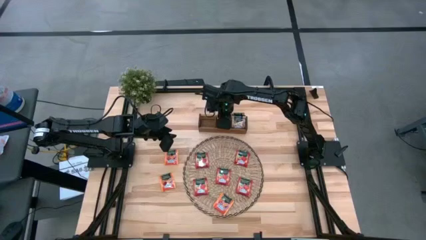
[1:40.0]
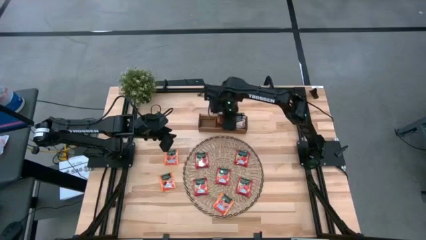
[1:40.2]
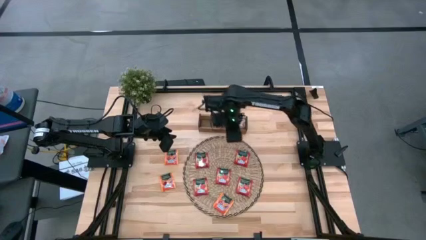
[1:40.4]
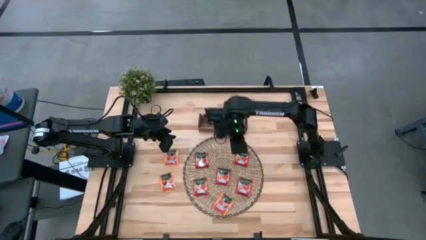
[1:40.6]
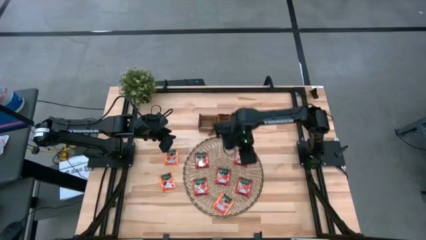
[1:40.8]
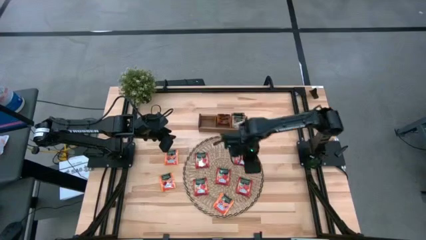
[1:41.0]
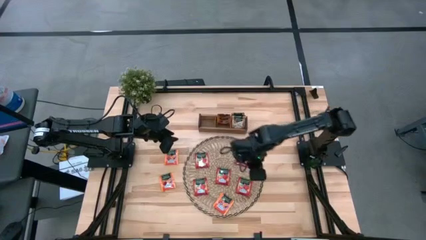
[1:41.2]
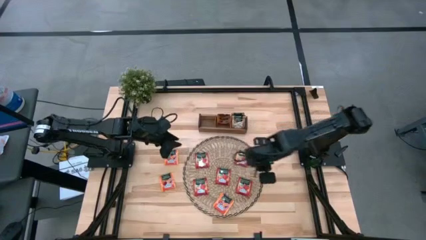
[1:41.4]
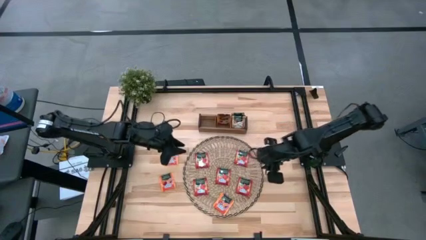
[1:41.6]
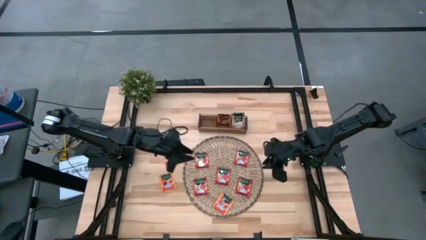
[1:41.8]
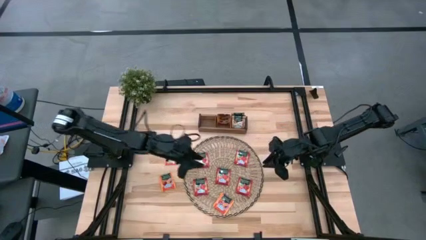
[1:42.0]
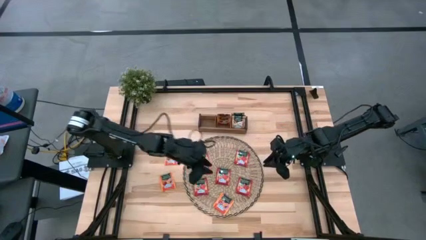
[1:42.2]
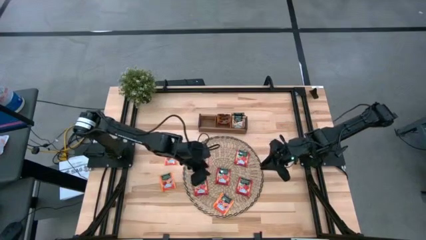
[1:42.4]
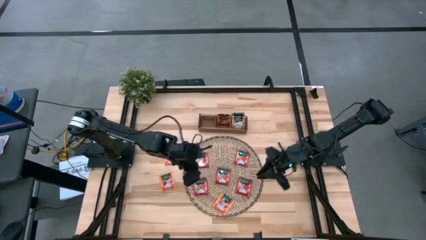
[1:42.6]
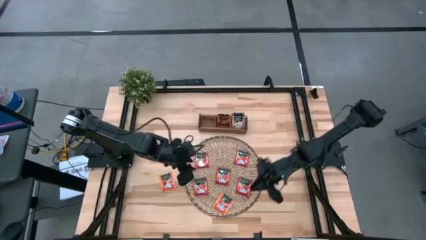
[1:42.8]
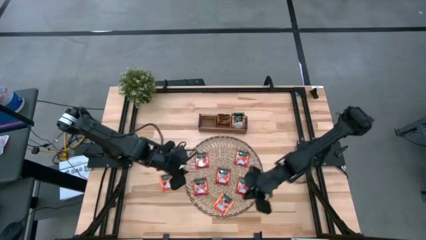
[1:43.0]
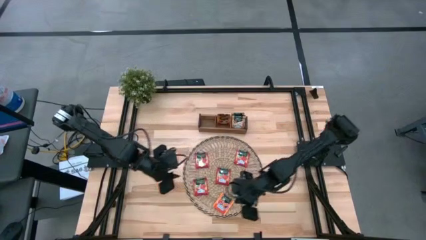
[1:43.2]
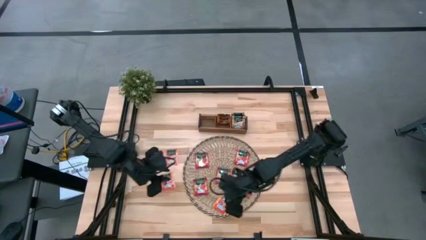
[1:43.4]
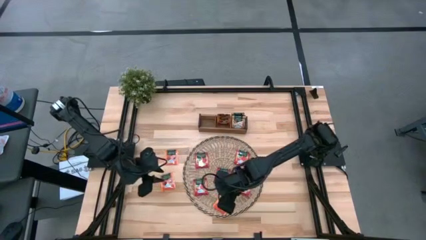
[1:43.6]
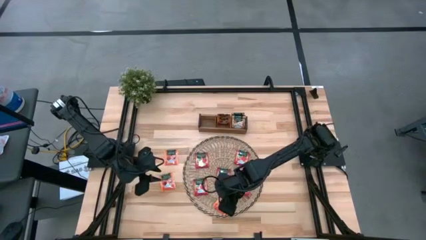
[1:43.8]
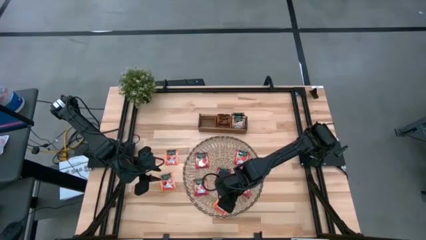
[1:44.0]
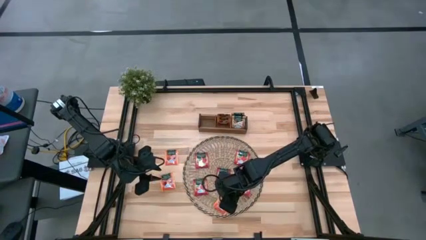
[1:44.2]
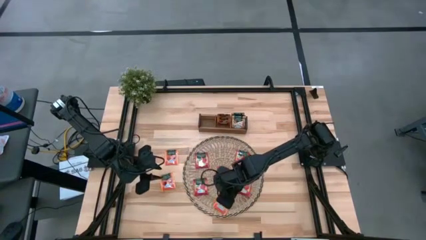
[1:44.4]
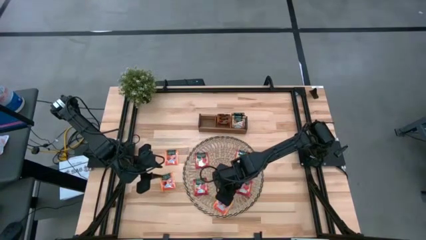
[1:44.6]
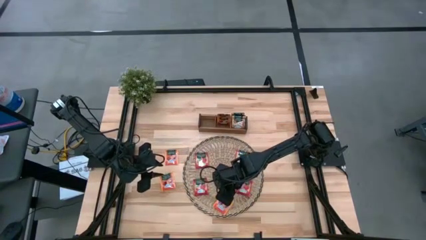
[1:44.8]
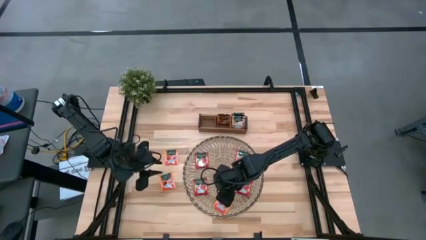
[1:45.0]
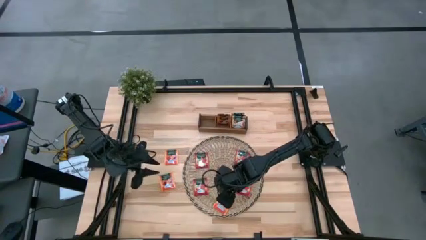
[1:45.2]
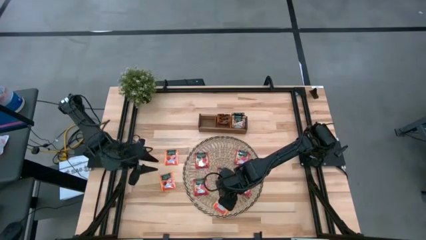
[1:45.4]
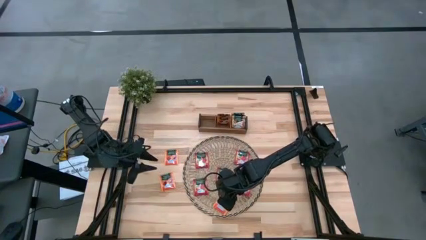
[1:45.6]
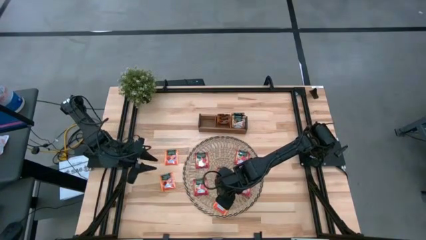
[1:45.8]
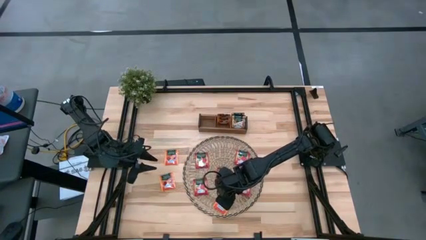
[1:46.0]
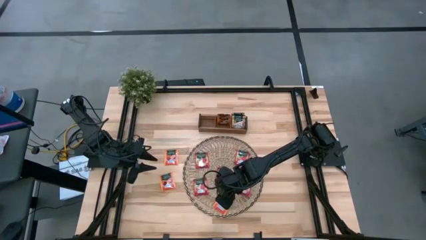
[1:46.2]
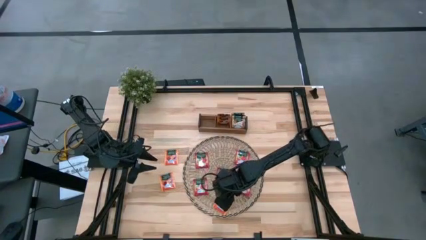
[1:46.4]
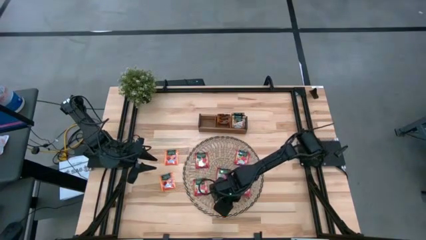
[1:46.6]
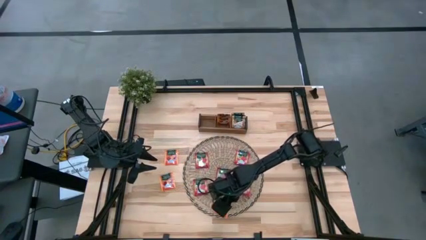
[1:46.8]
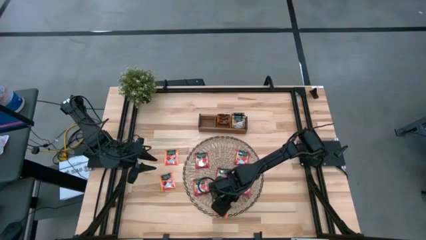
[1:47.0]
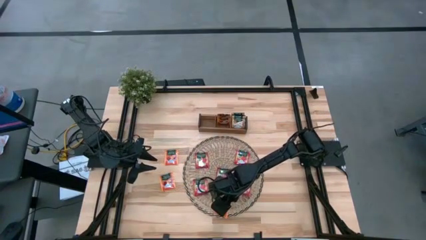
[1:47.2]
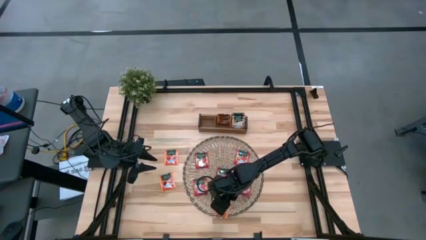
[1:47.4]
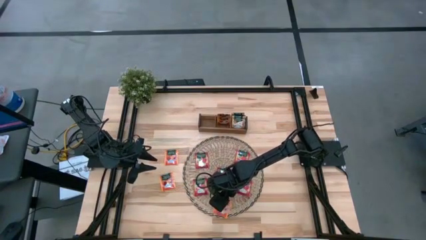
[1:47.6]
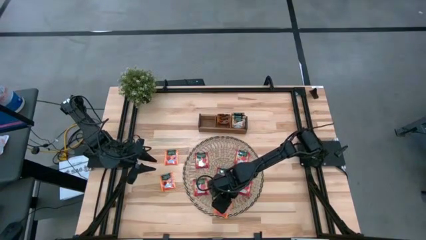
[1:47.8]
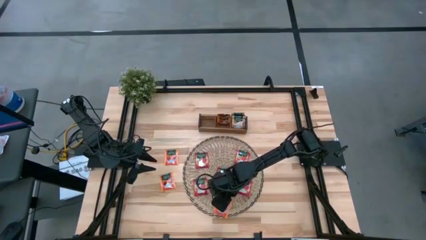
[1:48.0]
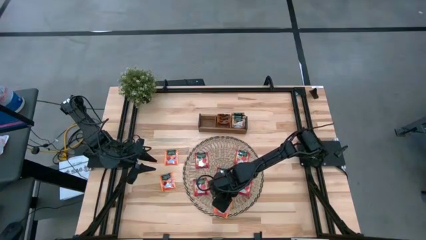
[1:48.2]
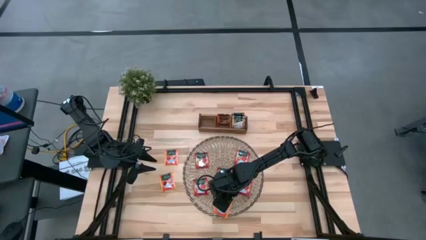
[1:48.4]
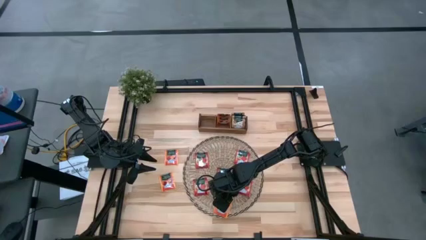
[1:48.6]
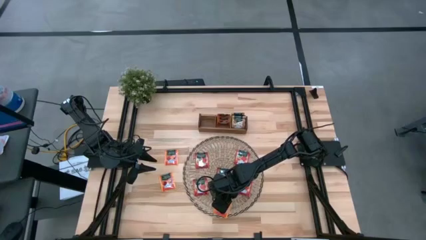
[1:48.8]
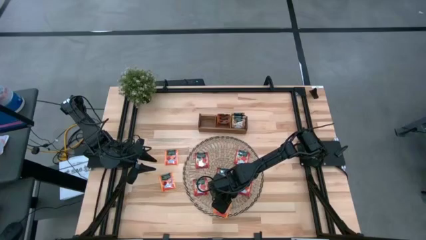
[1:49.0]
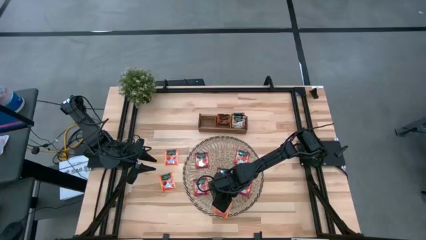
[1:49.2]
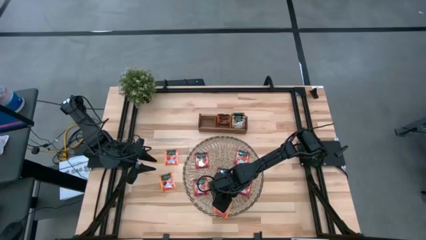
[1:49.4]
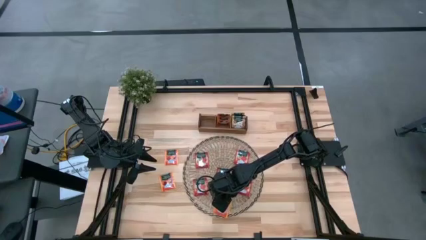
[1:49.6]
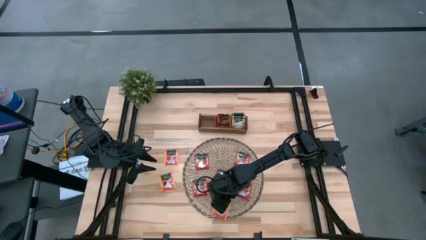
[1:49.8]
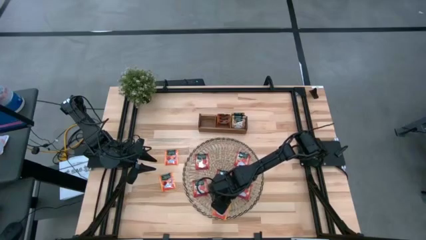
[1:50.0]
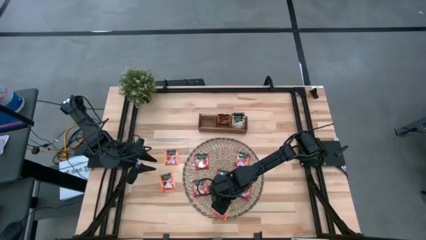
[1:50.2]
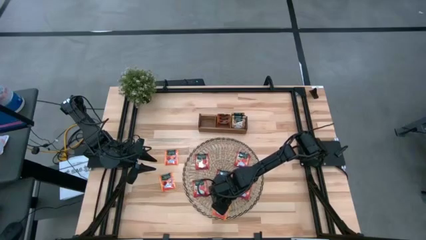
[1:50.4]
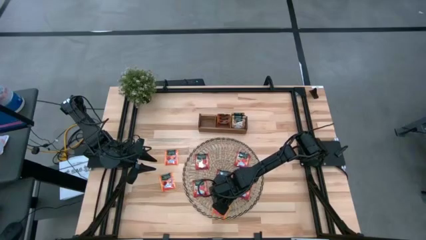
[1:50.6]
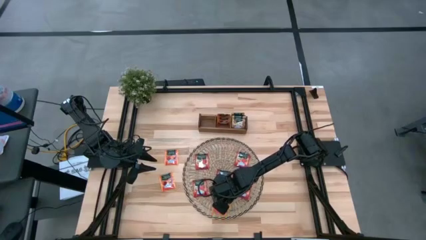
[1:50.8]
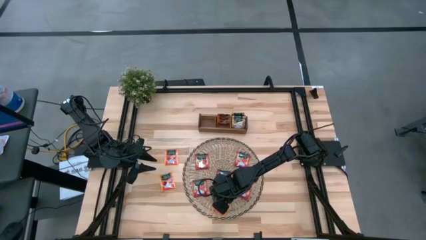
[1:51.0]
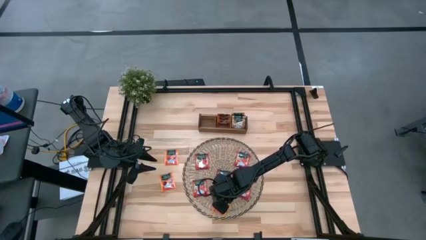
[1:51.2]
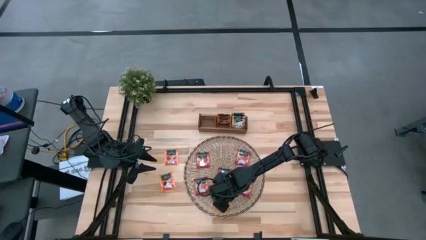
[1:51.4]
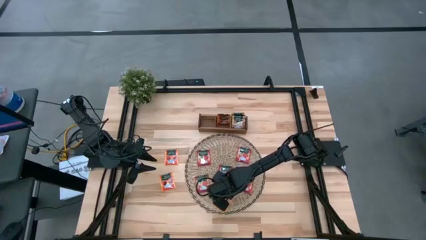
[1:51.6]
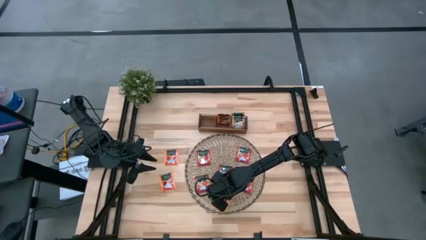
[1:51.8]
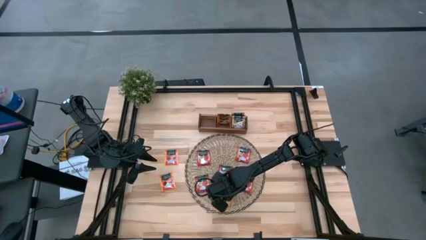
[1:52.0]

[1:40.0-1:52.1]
Task: Pick & Place Tea
Put the pink tea bag into the middle section of the wooden organizer

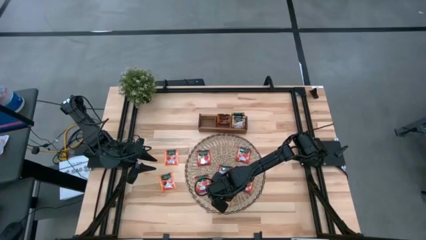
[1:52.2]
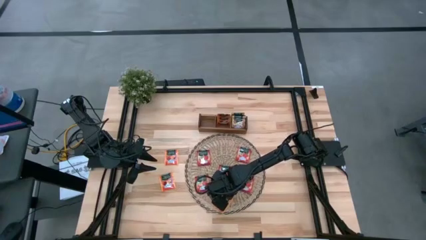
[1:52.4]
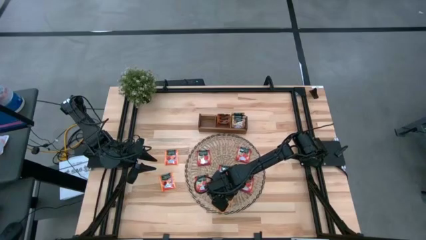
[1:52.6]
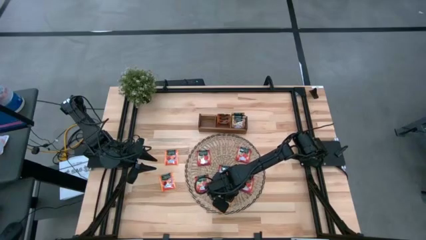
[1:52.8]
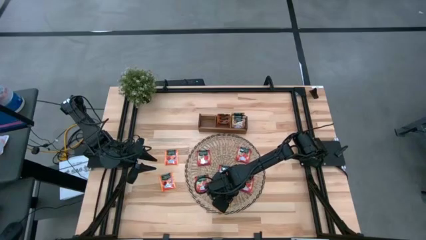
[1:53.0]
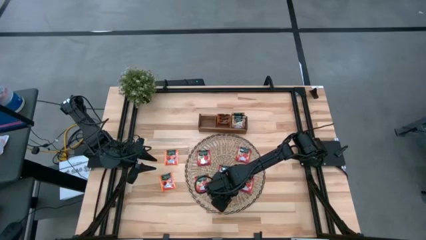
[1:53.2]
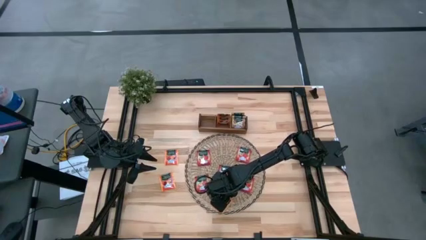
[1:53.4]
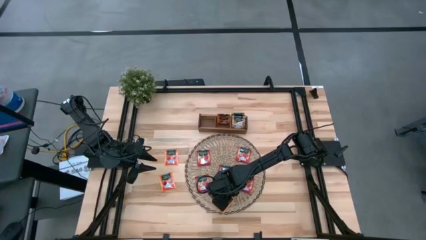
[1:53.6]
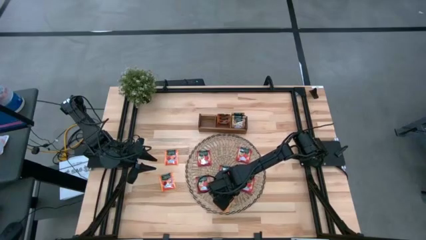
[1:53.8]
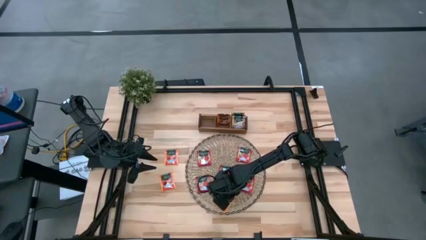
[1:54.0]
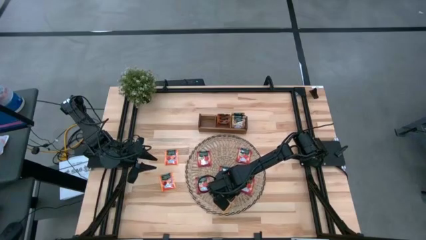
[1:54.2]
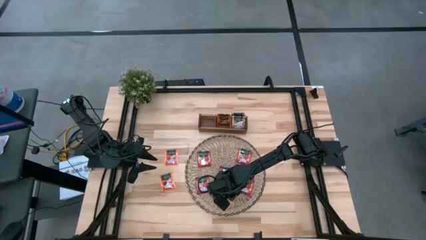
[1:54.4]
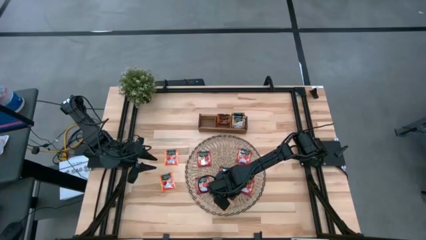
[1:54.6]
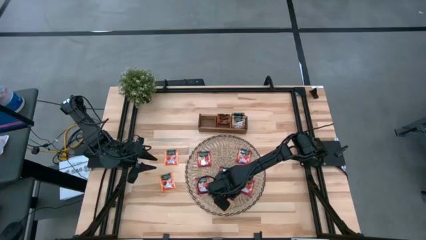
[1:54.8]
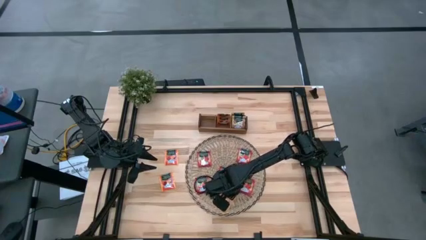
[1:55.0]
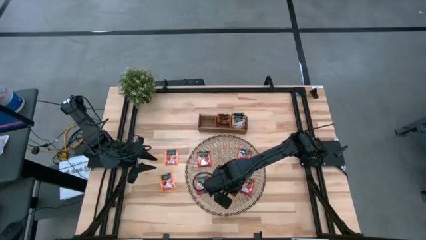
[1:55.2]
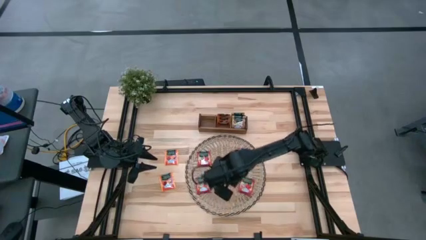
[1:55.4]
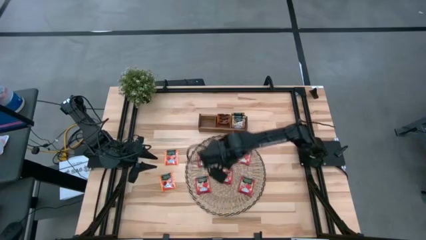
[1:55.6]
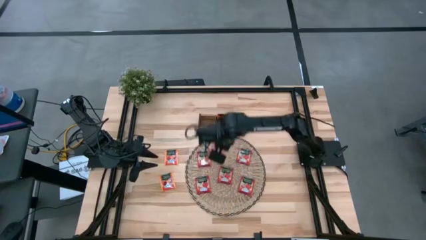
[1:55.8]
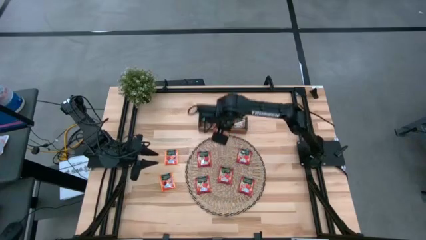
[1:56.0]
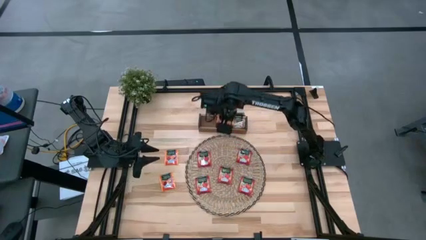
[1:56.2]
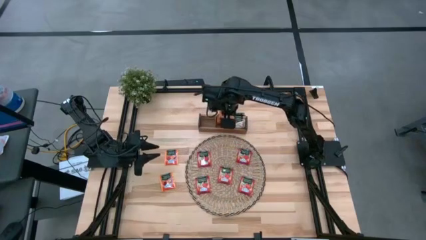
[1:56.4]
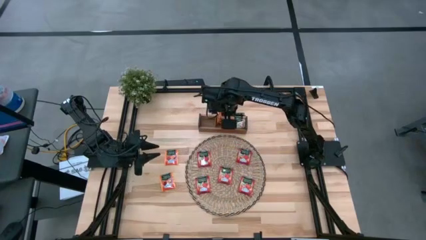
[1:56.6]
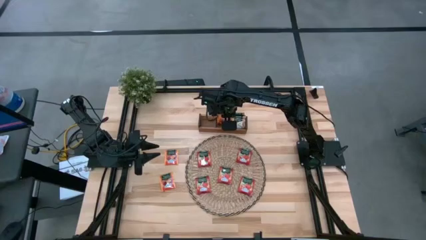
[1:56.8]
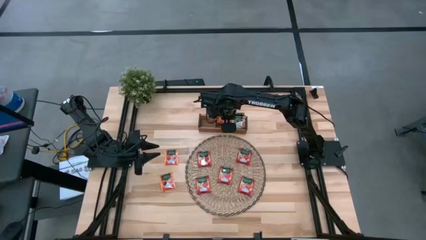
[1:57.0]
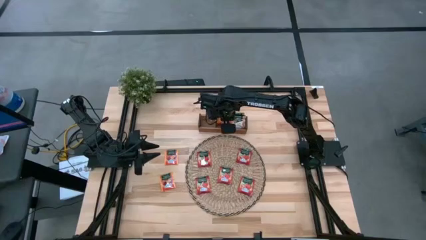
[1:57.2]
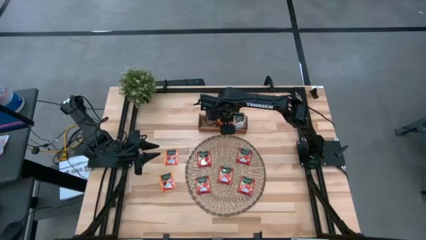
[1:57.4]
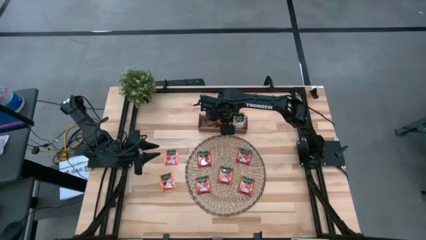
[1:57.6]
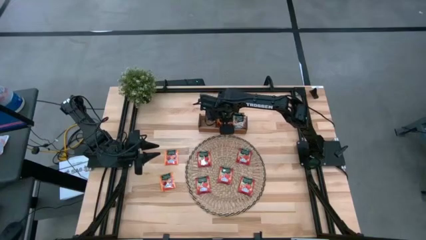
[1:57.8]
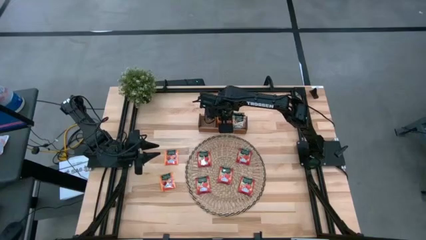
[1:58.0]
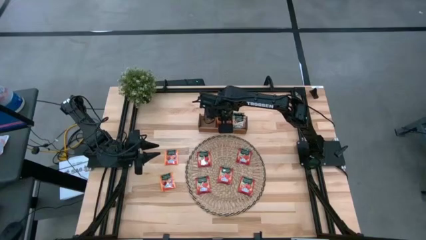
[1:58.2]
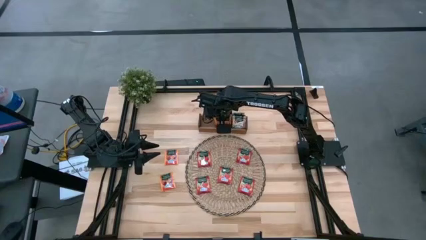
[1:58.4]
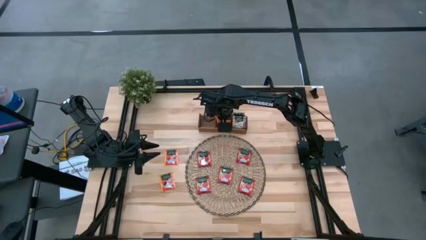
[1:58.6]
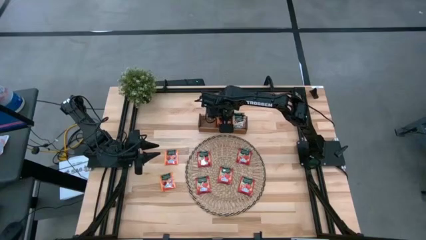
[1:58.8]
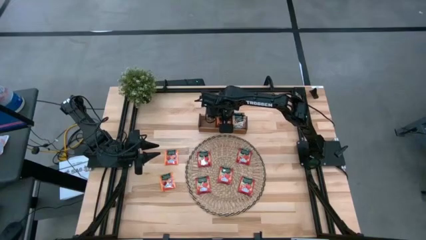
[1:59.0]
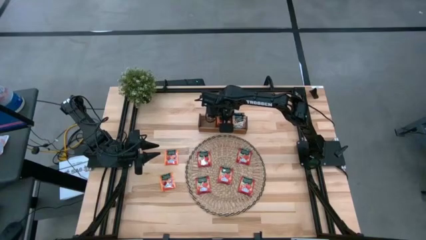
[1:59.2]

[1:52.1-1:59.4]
Put the pink tea bag into the middle section of the wooden organizer
